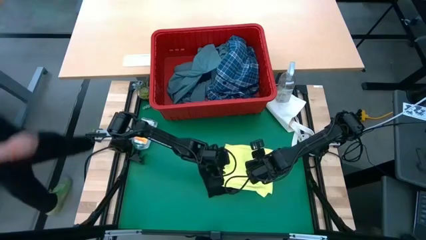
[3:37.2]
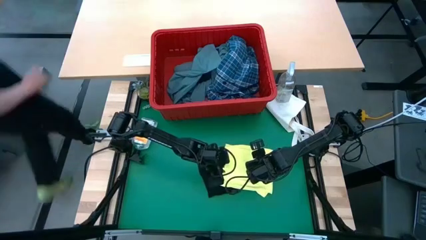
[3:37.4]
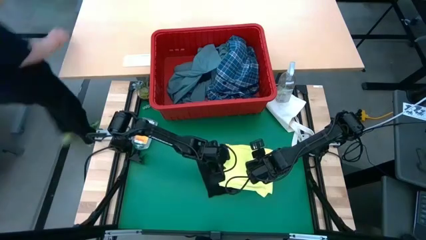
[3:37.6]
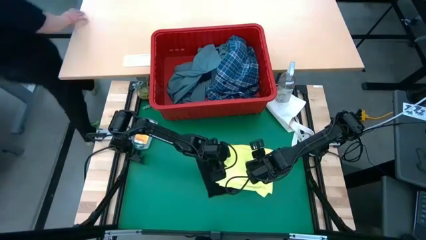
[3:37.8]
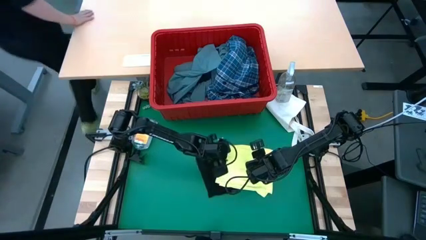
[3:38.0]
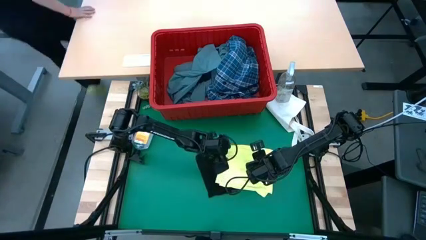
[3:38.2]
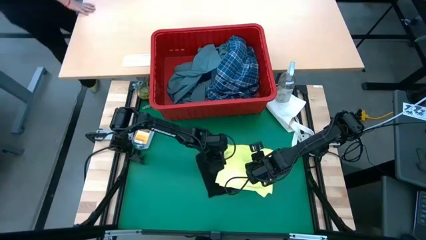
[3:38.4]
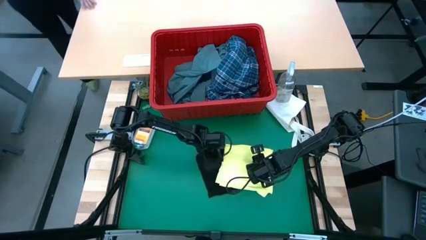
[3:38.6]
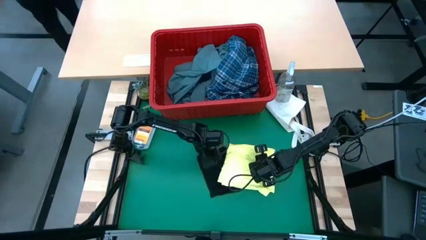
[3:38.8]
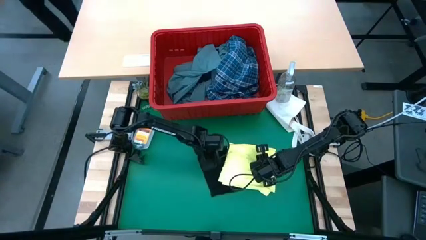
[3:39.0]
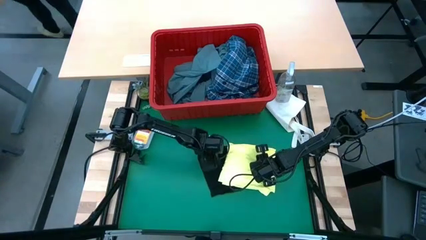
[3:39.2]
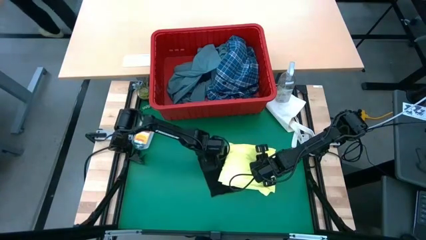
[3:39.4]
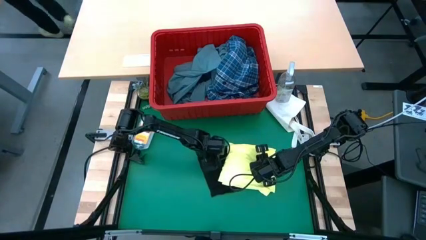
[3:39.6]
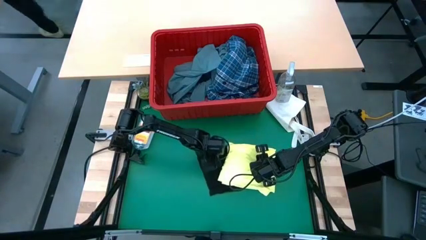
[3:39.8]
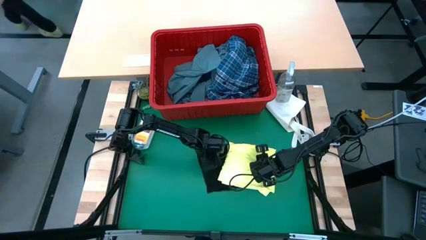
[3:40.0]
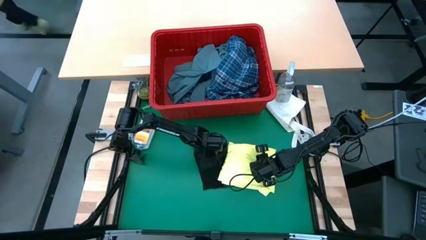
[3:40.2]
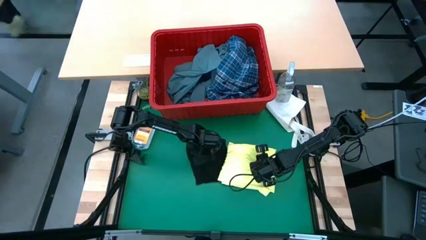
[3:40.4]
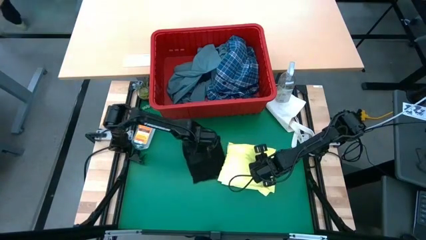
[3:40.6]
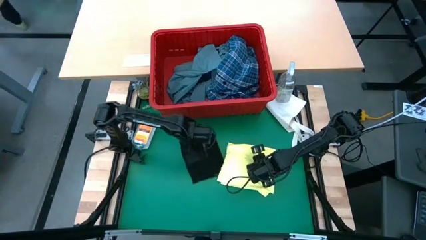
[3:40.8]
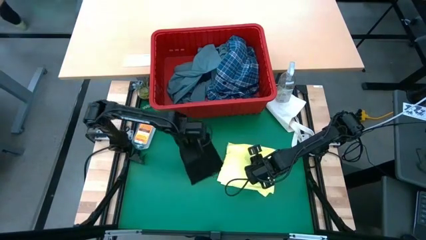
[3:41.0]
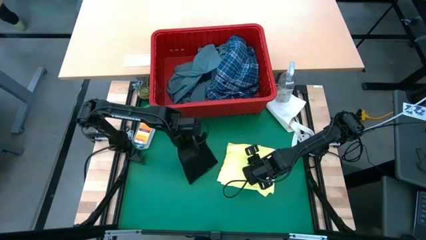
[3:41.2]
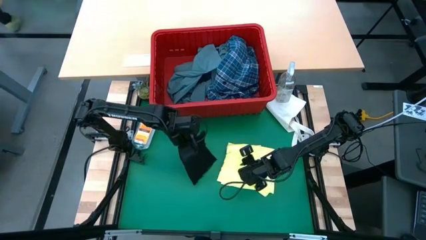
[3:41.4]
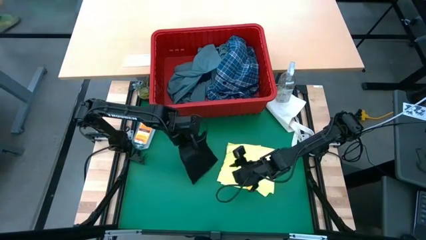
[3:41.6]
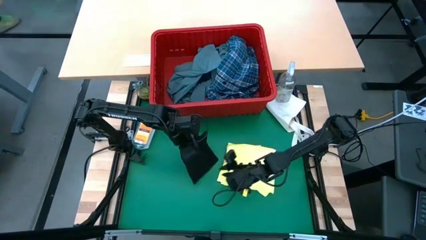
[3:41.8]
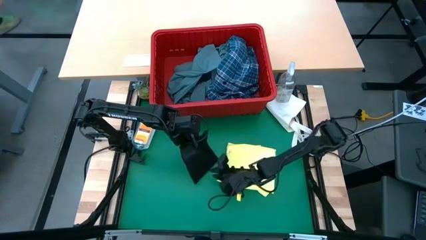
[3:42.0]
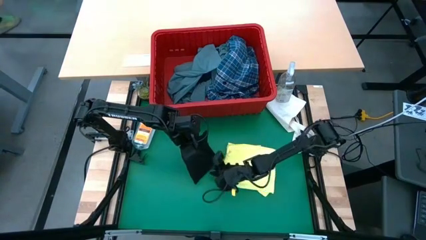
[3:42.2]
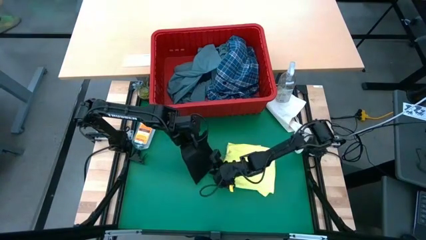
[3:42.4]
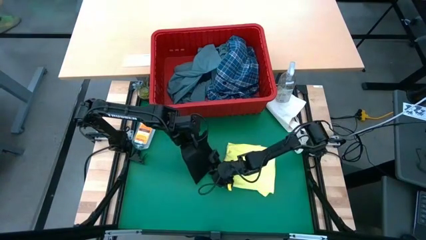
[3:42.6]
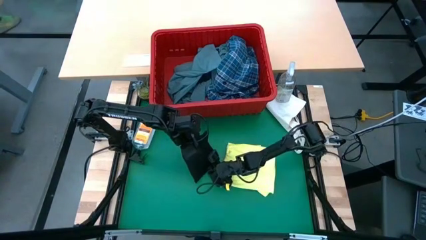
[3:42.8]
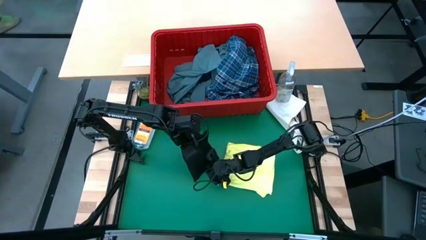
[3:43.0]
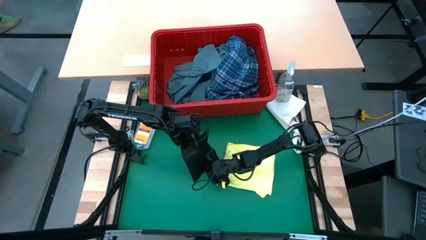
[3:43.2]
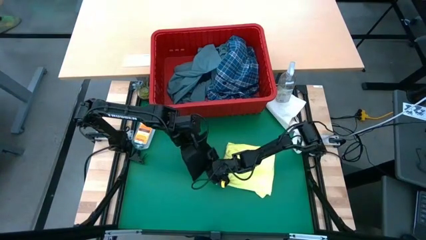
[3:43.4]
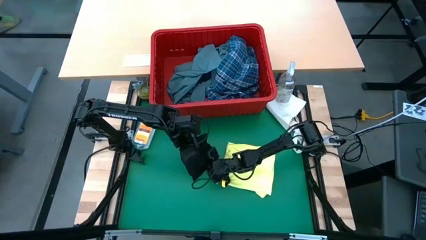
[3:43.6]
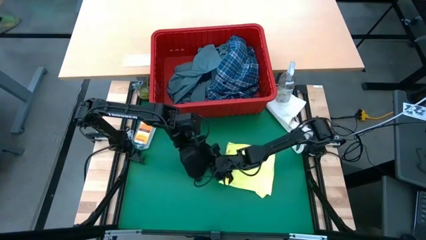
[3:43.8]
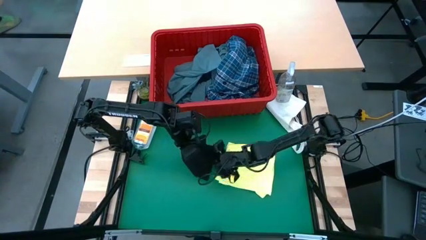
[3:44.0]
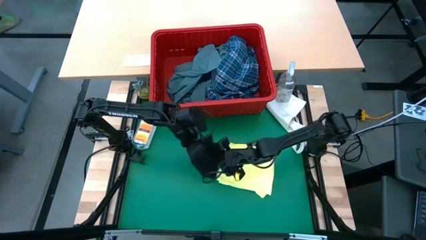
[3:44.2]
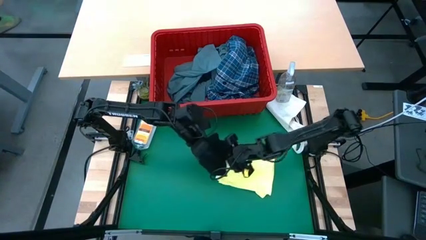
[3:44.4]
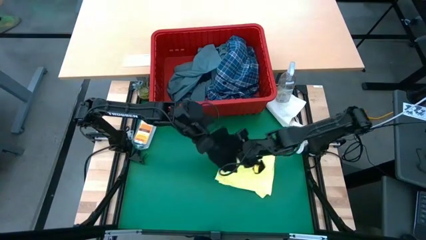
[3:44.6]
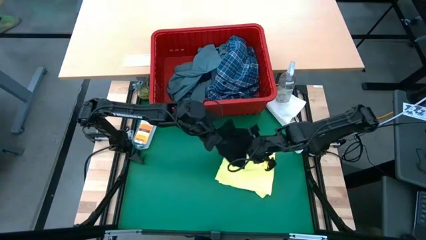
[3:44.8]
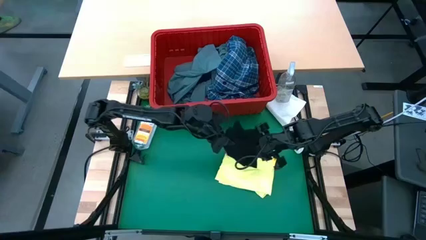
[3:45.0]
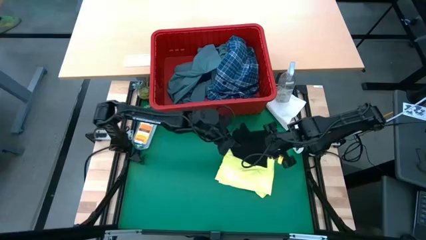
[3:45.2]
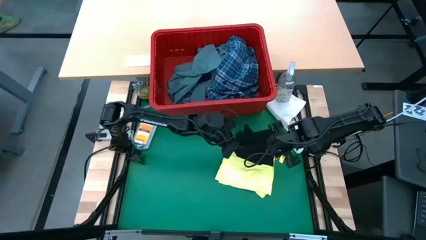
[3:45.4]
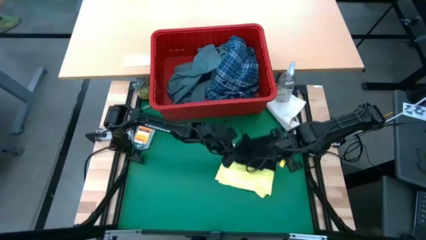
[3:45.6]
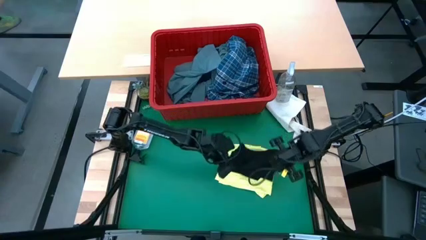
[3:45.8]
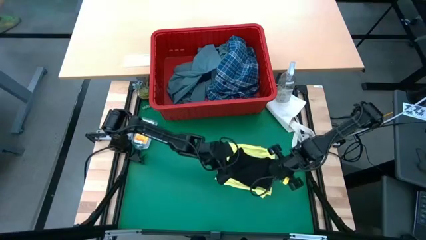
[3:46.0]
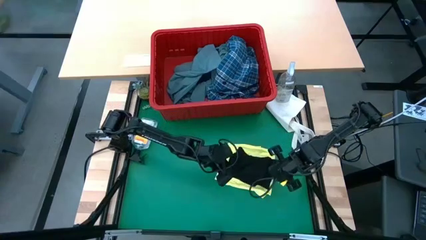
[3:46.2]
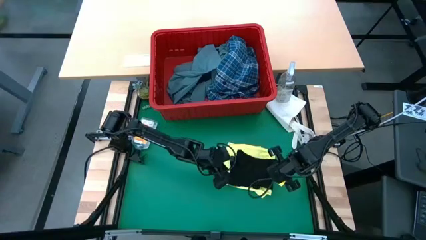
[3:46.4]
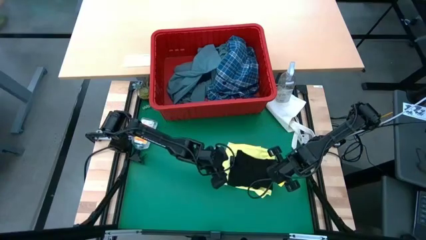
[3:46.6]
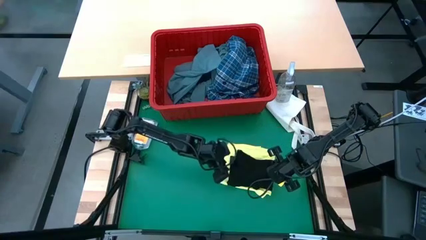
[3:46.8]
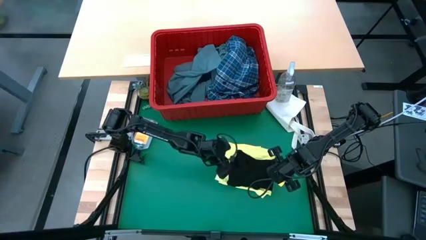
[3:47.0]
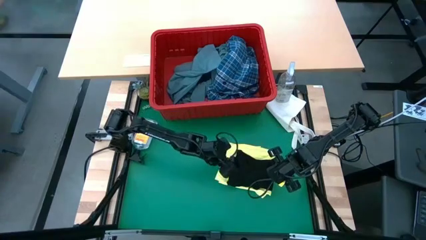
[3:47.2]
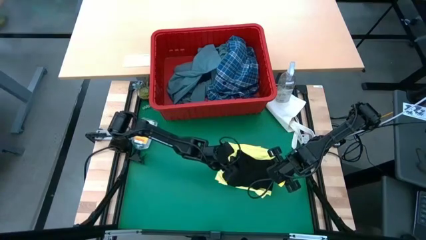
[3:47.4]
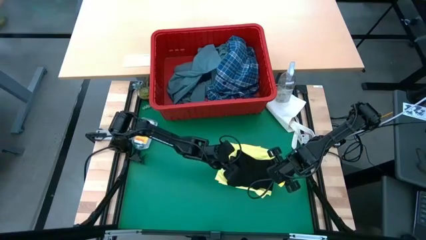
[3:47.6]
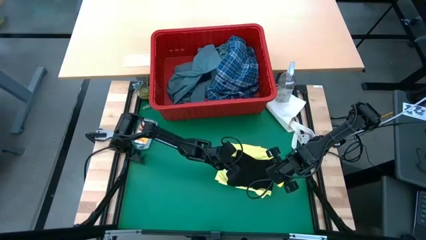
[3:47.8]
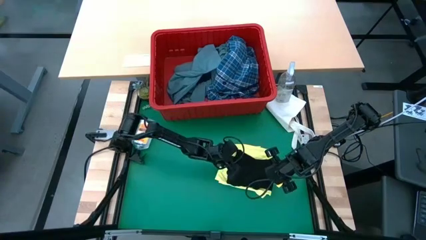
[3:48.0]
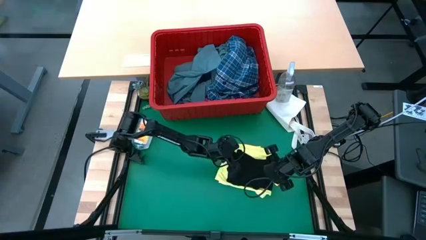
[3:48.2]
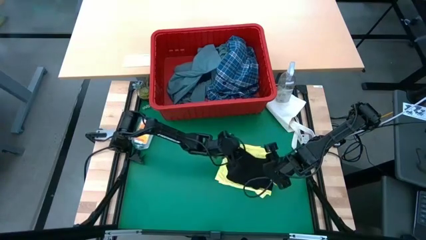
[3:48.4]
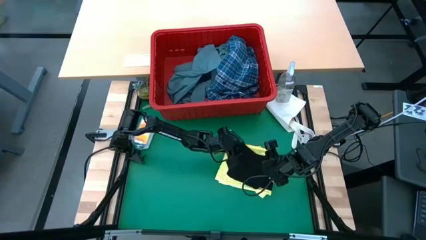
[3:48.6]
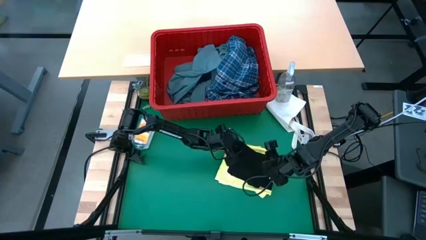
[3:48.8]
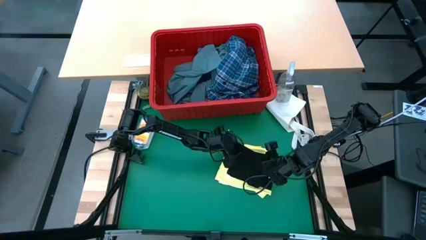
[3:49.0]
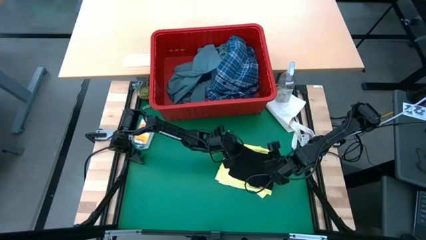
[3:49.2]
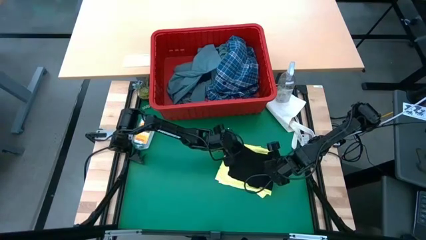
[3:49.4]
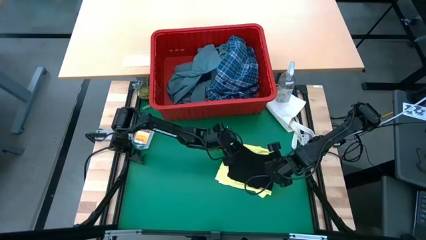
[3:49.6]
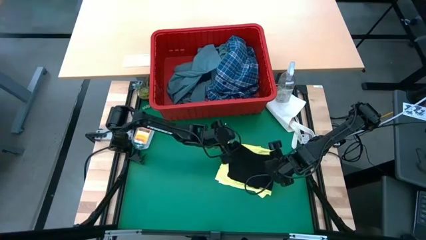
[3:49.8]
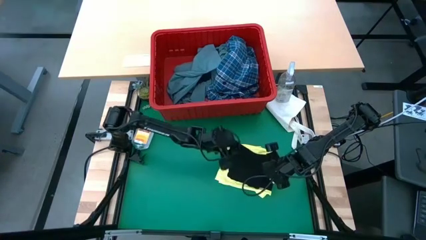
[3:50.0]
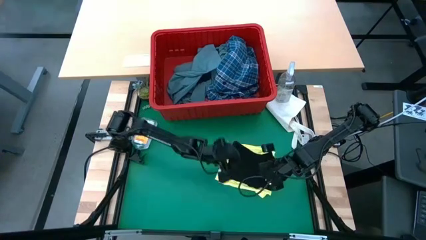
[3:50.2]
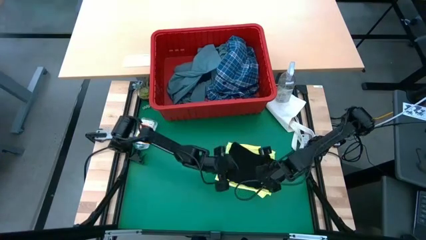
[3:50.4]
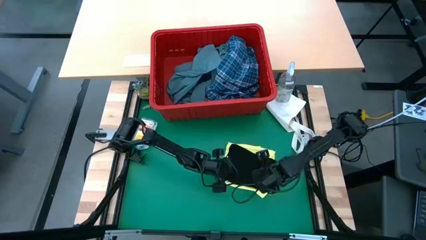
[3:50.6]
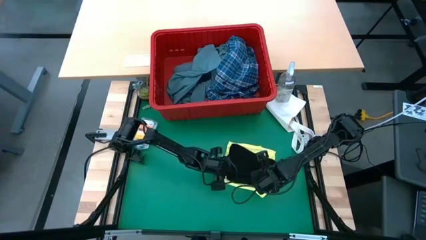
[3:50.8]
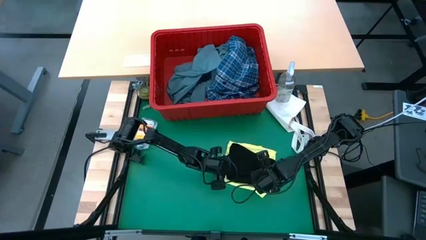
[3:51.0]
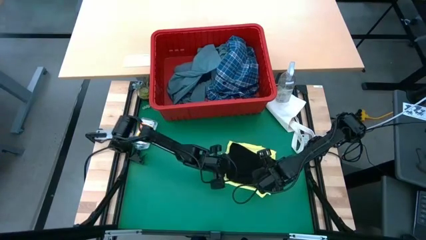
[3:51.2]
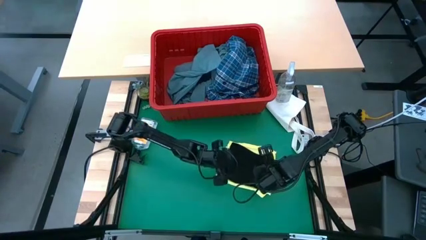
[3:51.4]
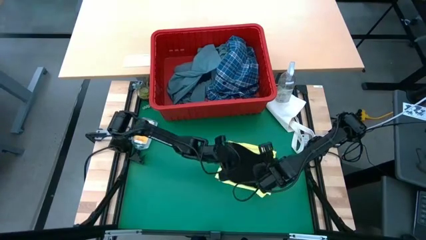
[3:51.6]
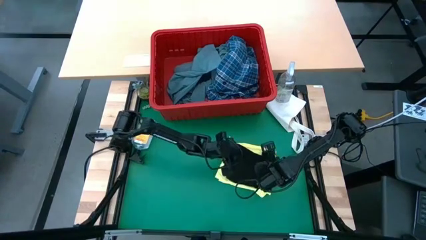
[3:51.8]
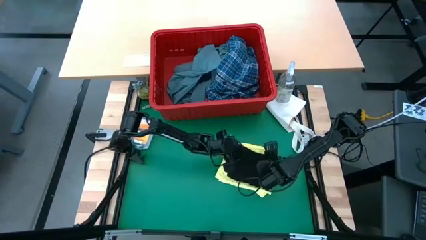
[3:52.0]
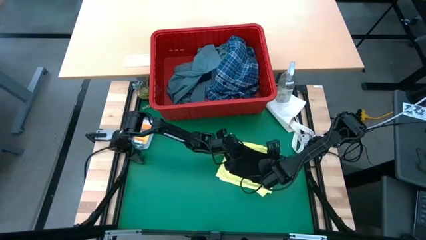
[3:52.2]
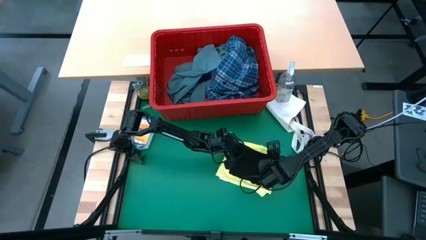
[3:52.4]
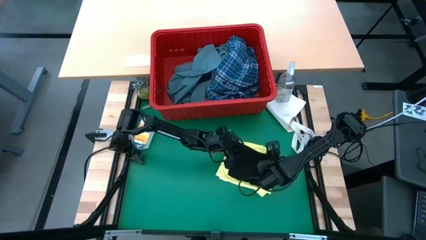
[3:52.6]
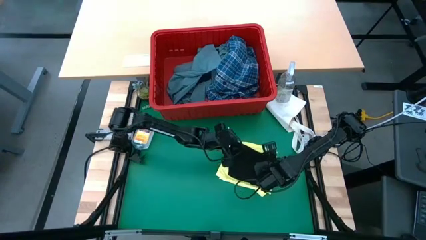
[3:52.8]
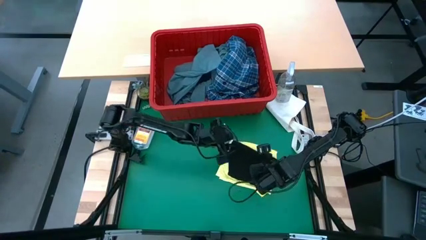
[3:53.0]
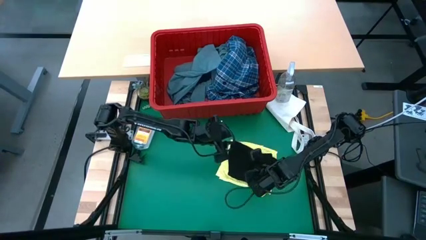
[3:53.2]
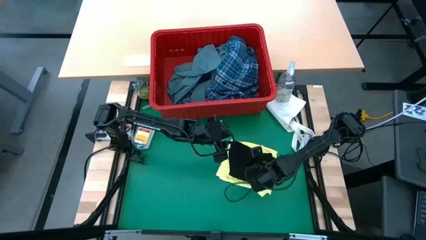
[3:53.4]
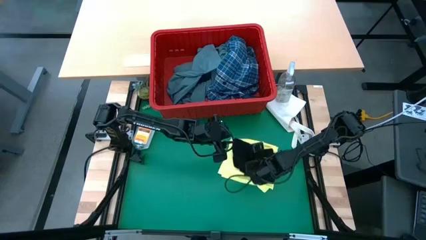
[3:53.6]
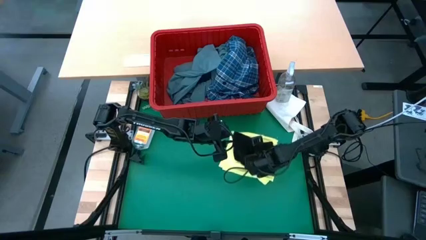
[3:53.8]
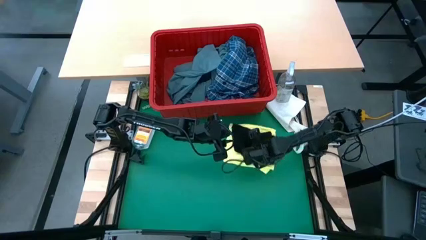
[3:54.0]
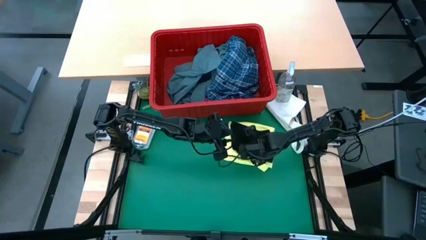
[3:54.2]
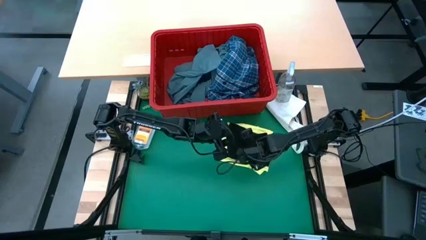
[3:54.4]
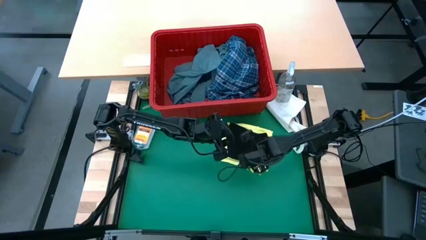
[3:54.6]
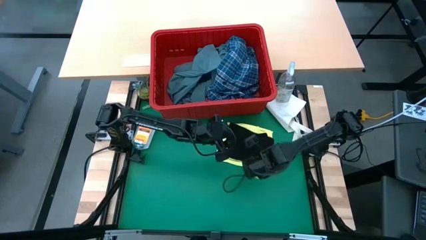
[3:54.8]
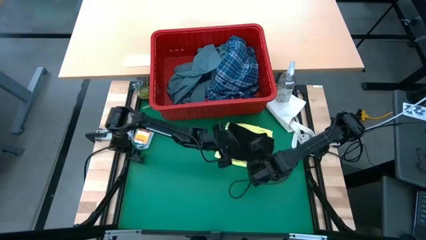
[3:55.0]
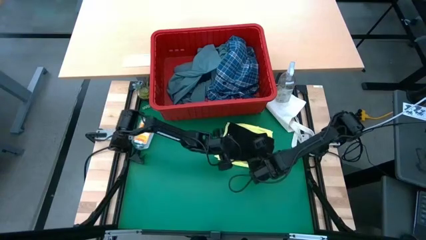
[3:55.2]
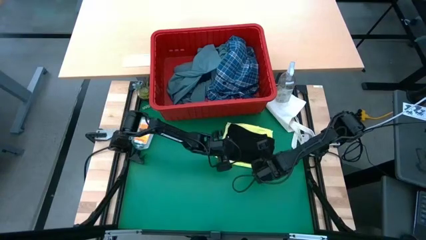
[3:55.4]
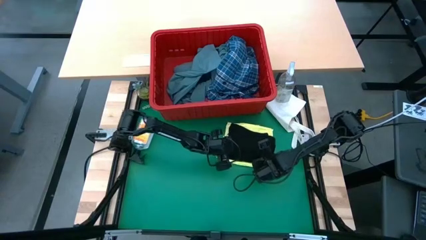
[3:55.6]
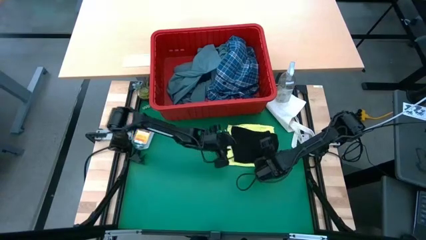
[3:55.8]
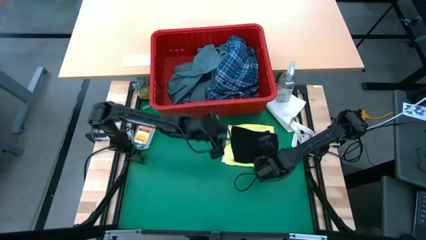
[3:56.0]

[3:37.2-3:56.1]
Task: Fold Laundry from Bin
Stack the black underwear shorts on top of the yellow shirt
